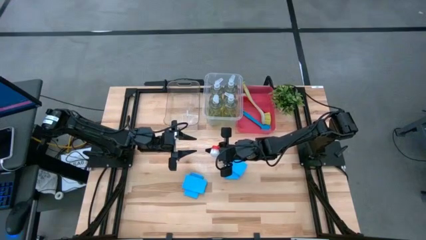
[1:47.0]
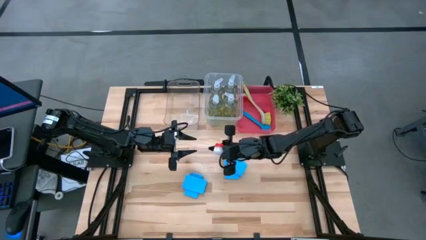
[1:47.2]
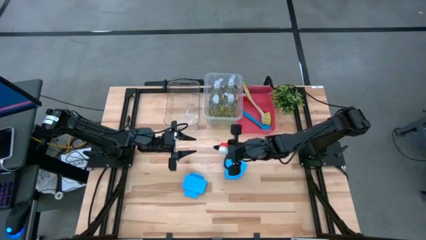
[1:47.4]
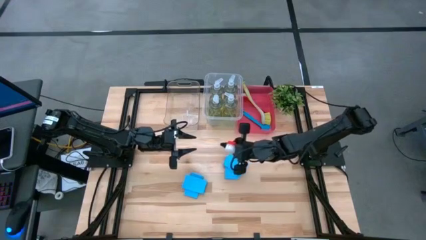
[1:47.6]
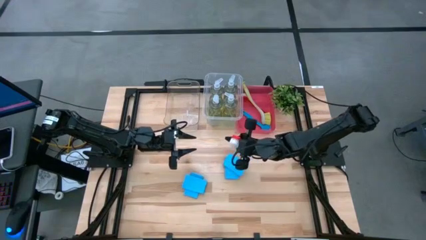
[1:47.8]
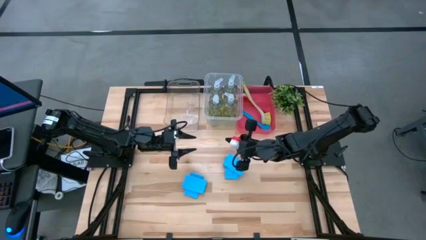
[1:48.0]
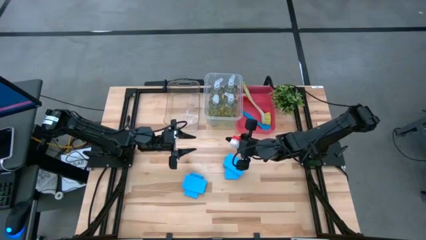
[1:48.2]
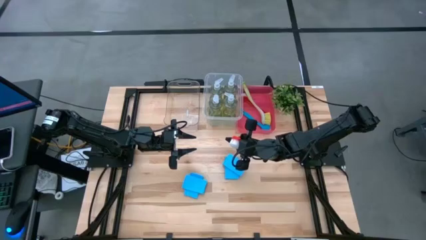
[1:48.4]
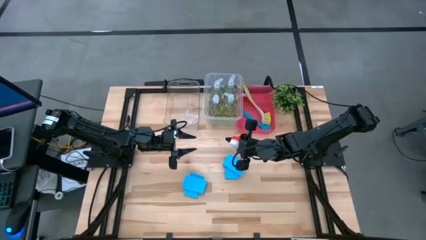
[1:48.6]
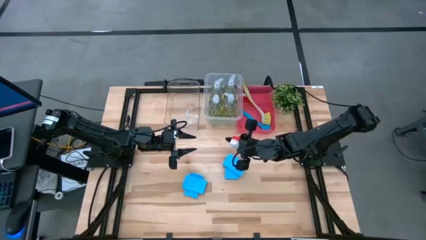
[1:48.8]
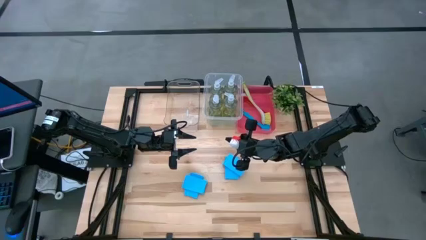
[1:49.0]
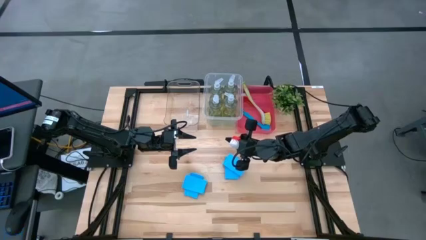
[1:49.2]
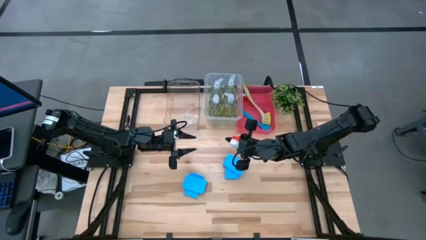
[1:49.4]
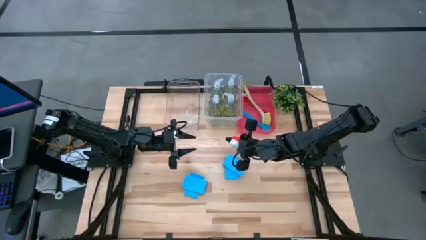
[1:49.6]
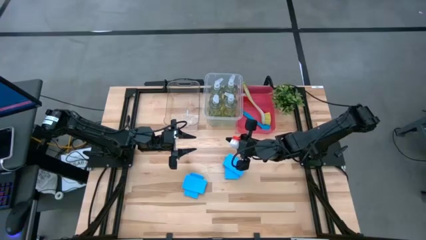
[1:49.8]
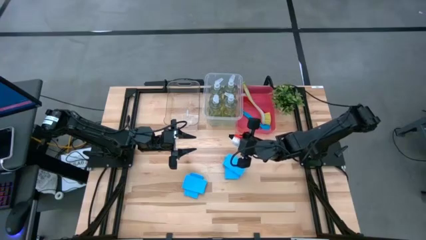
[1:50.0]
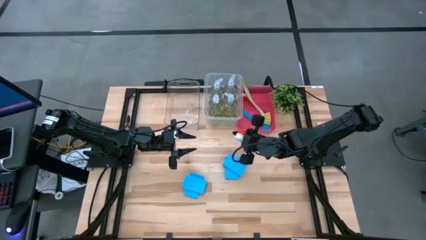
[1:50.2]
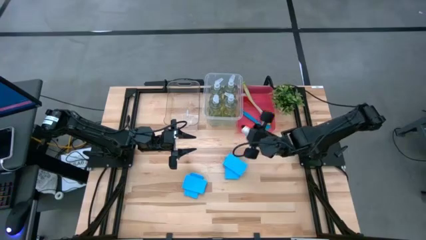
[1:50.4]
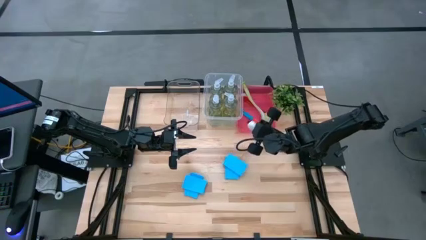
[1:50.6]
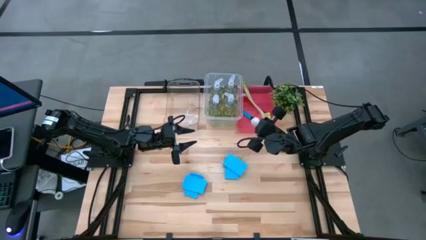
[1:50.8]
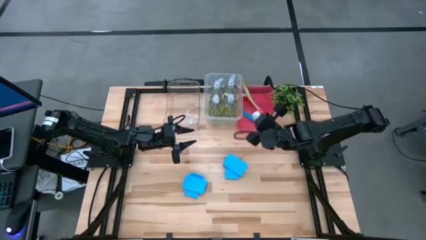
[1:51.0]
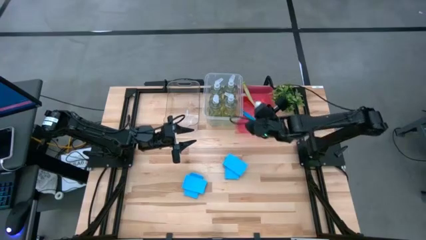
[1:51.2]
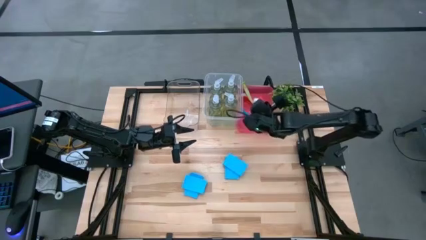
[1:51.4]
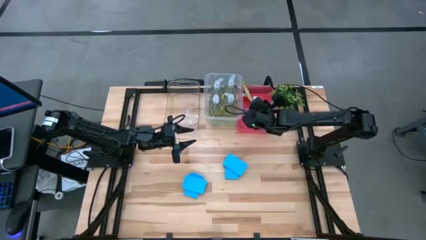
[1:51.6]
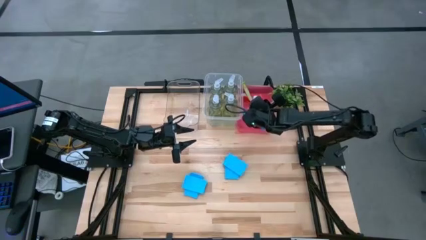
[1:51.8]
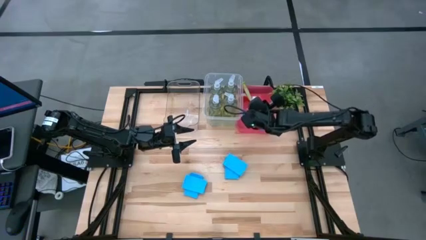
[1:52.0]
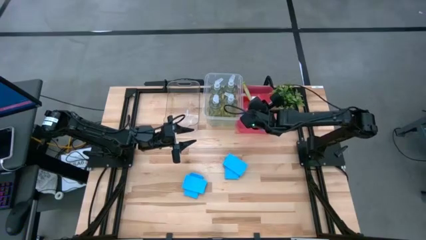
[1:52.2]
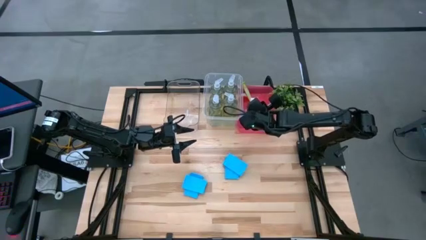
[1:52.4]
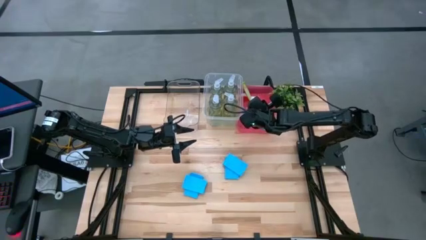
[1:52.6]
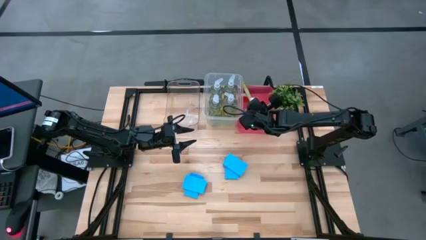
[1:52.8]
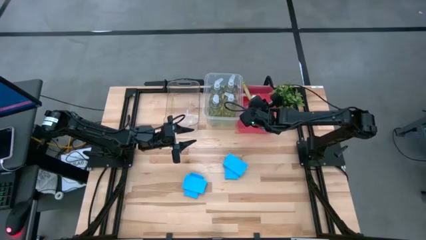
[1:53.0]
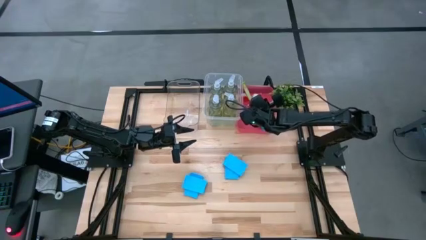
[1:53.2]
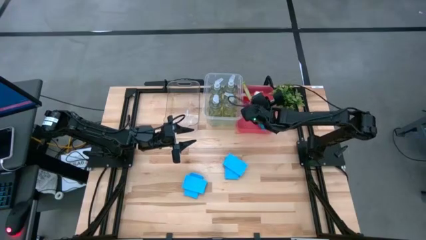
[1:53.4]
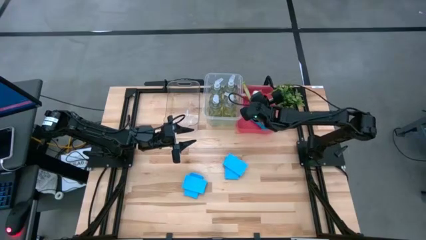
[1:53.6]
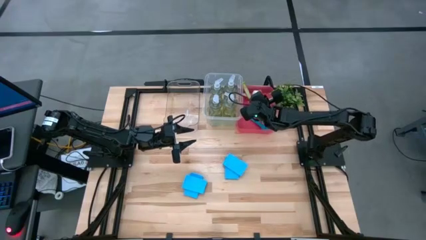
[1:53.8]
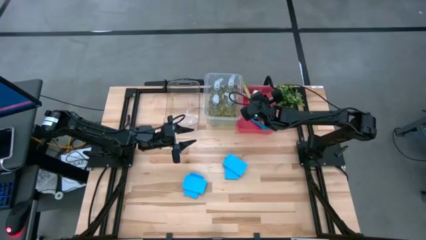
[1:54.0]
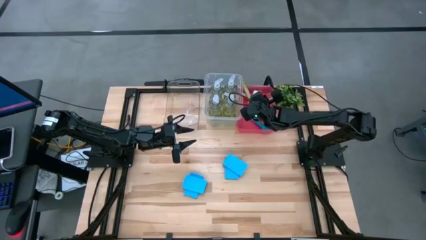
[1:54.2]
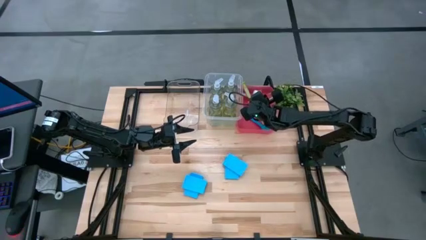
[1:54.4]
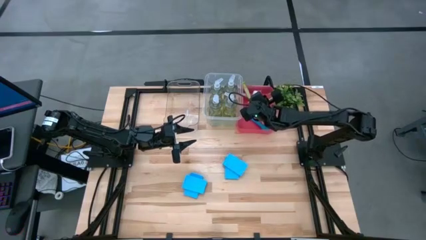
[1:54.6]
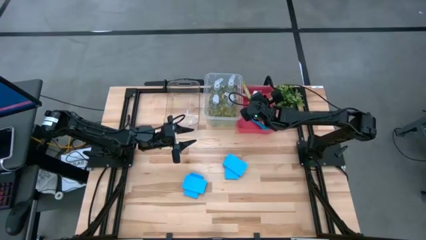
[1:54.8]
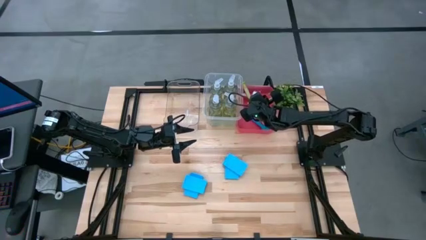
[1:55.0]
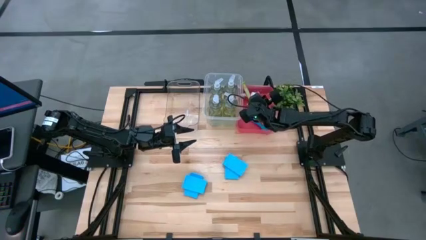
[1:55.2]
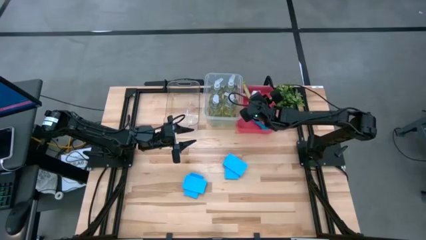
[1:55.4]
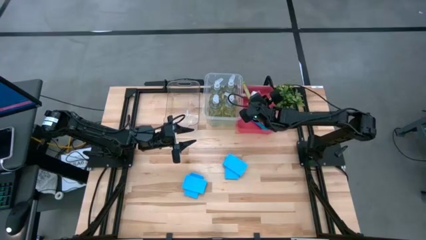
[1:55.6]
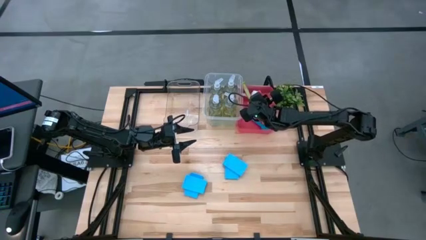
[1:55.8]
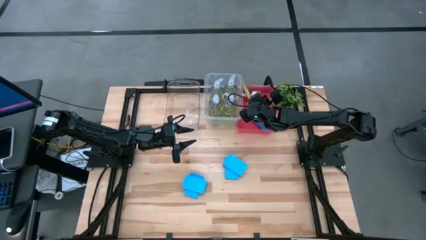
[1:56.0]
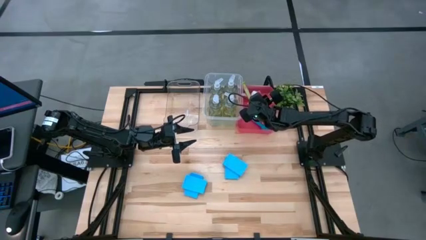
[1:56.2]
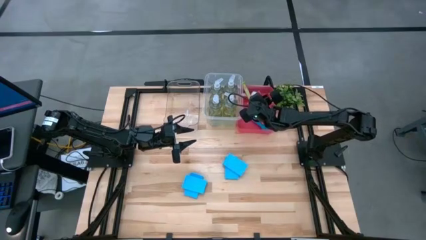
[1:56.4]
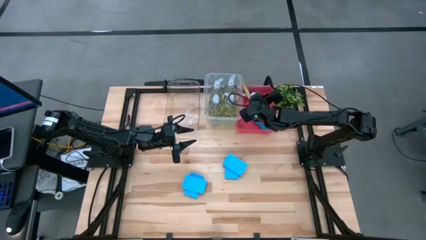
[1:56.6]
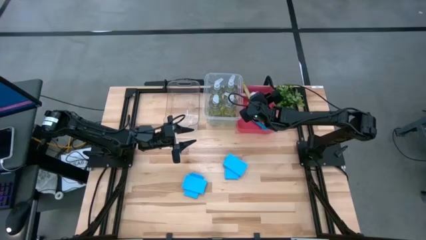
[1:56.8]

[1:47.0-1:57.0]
Task: Pick & Place Kitchen Sink Supplies
Put the red dish brush into the pink bin

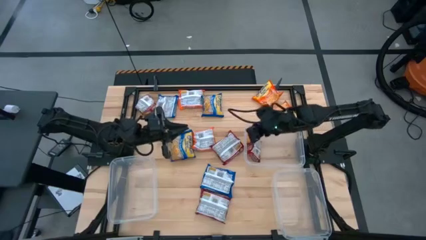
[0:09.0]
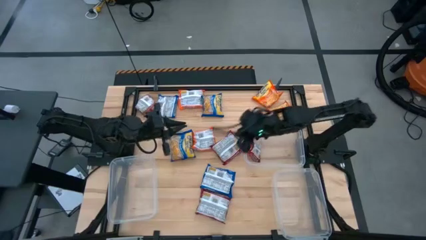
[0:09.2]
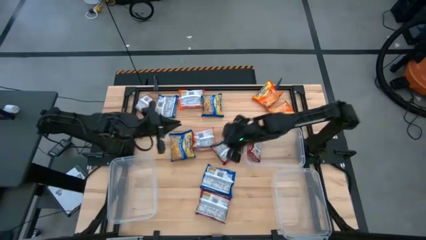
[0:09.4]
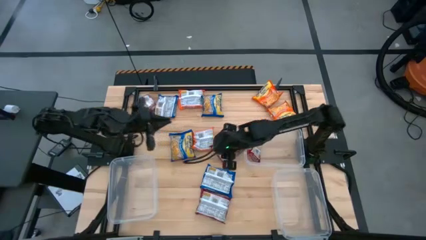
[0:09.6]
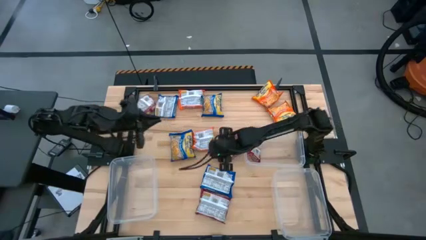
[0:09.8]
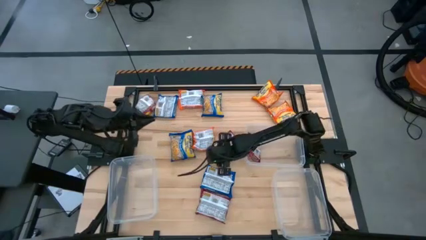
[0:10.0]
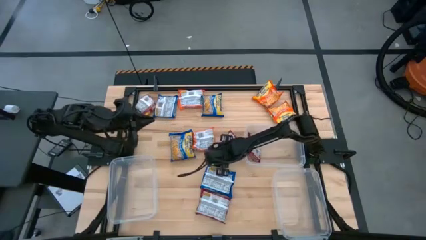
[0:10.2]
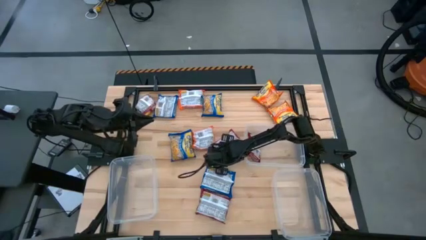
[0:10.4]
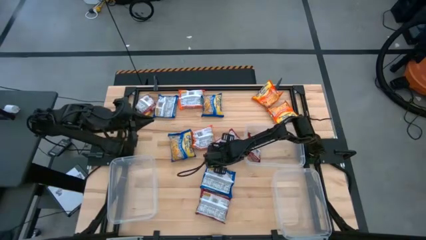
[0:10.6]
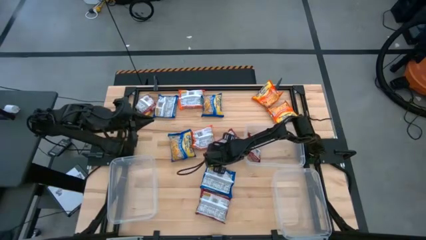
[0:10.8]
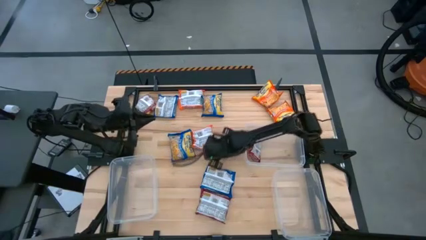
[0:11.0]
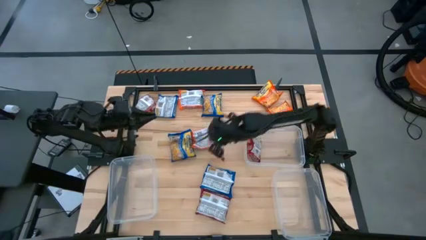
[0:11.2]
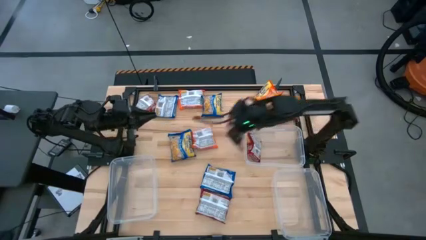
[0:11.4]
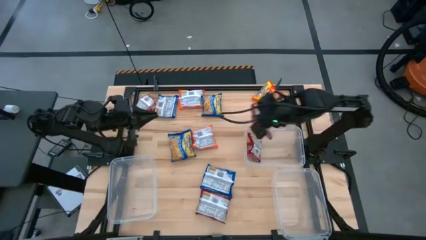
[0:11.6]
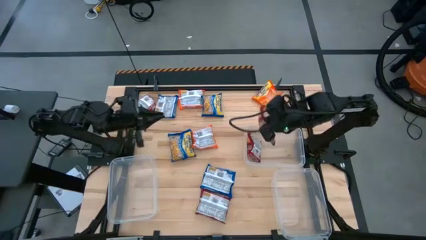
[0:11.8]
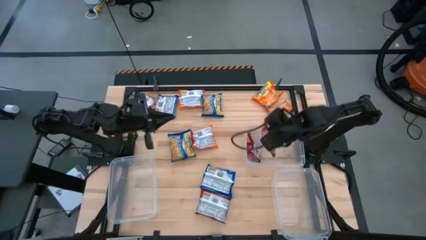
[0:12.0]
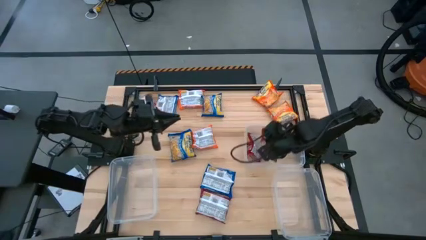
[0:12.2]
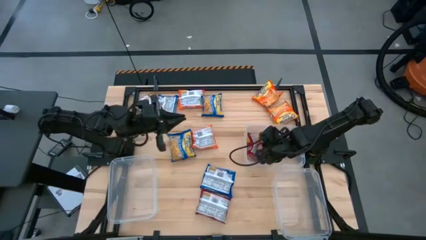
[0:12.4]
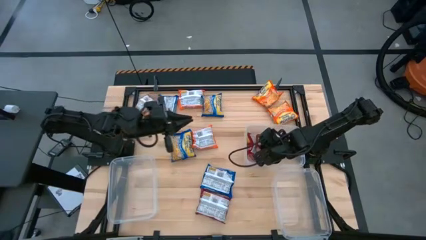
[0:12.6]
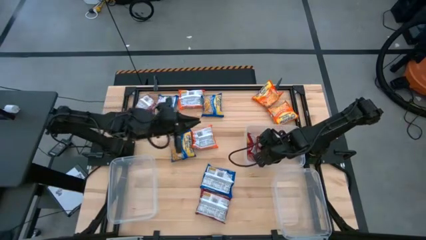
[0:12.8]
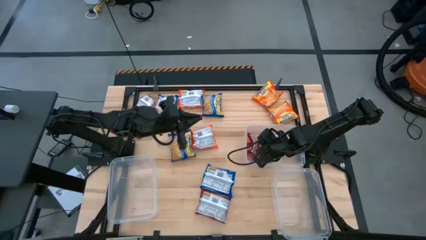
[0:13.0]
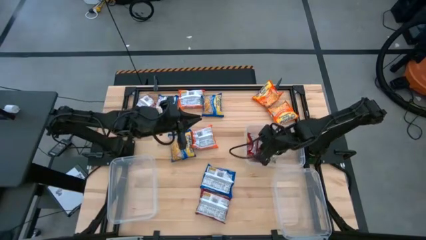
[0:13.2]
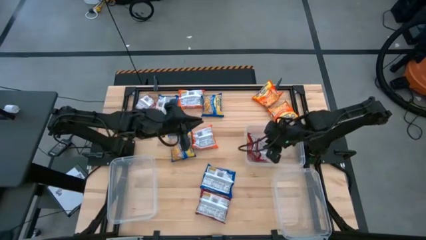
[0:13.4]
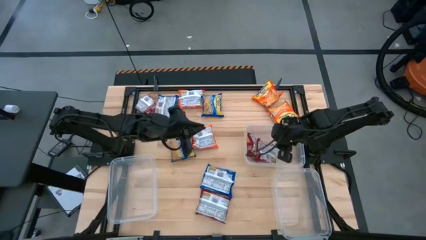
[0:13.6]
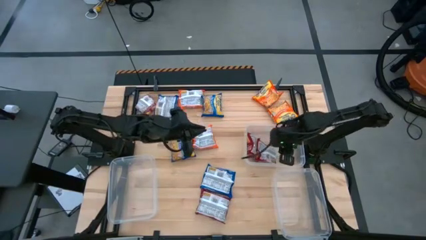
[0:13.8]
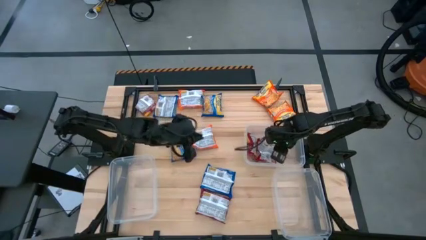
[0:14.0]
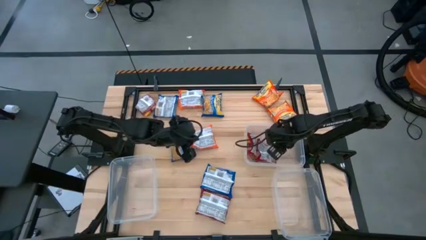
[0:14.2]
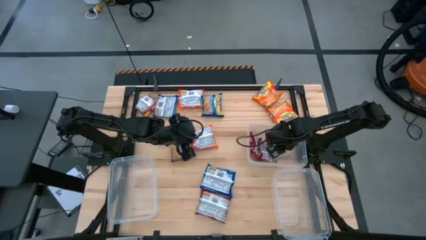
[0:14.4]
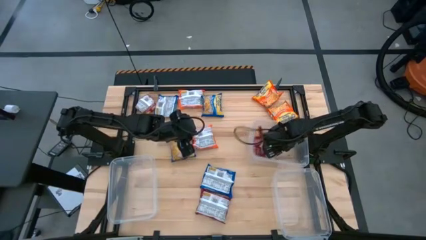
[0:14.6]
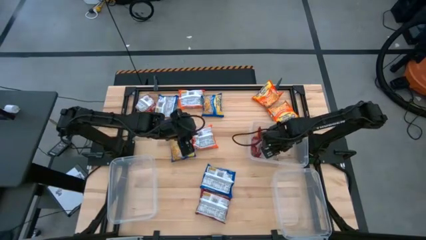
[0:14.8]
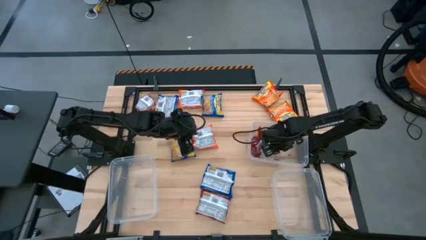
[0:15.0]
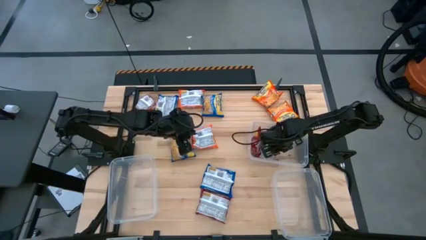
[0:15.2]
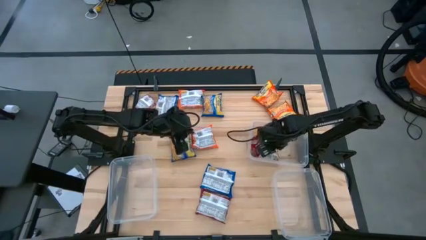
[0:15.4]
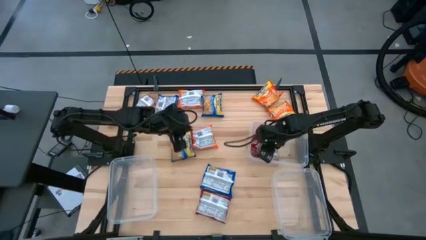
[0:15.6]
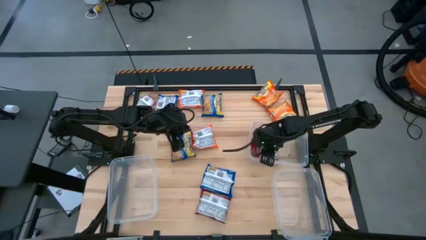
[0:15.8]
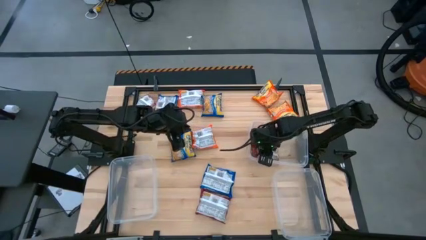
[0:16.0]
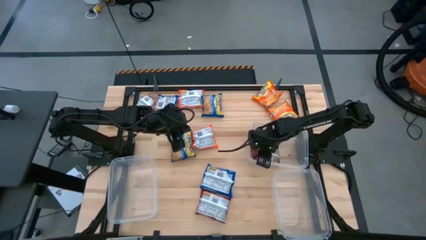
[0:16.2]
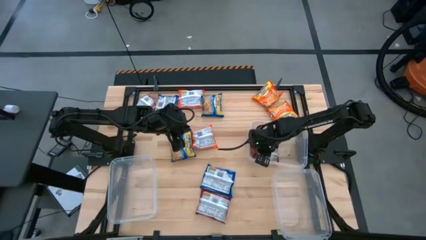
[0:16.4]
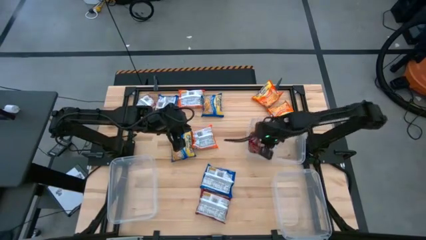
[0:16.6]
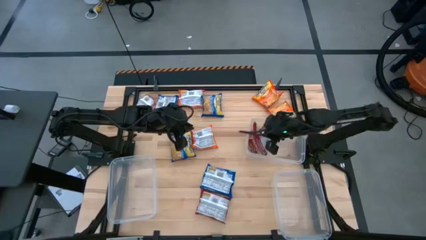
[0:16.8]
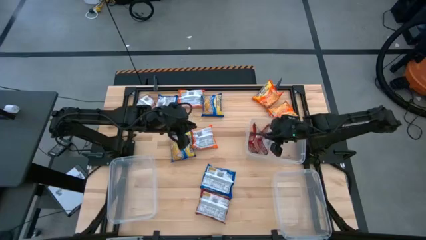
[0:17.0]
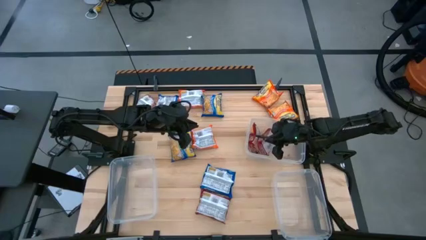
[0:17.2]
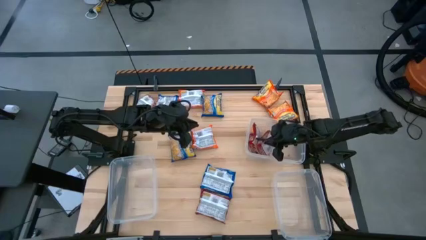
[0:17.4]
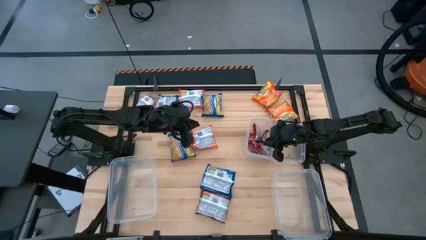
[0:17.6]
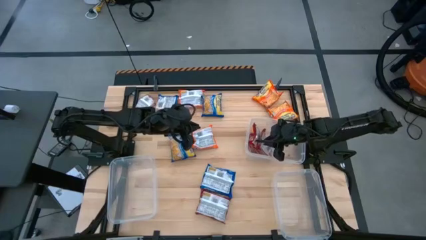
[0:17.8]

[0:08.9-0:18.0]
Task: Sort Maruchan noodles
Put the red noodle pack into the top right container
